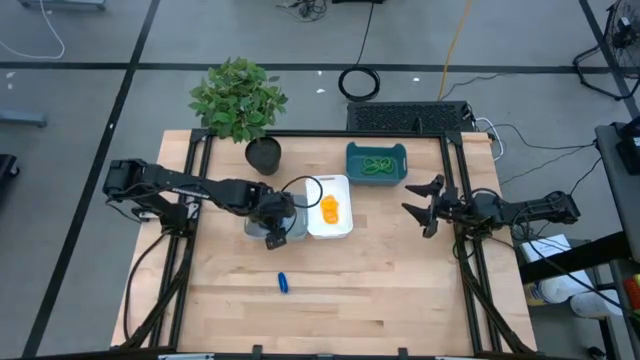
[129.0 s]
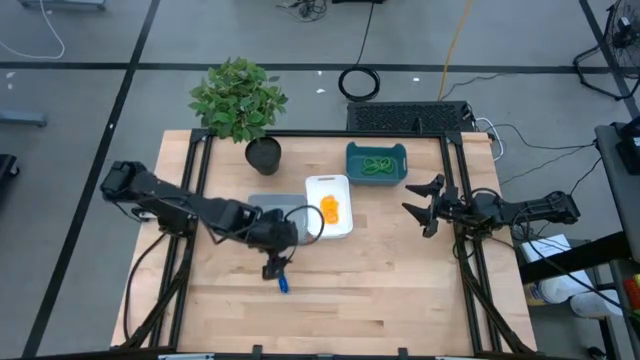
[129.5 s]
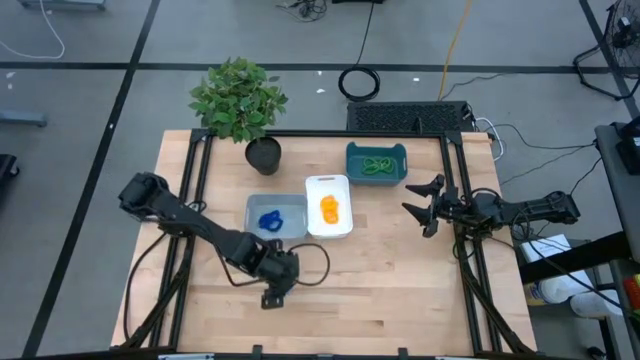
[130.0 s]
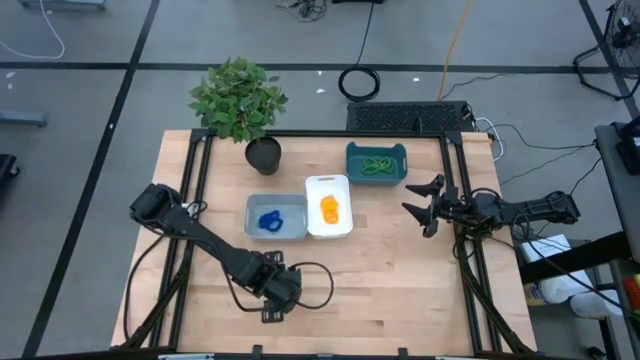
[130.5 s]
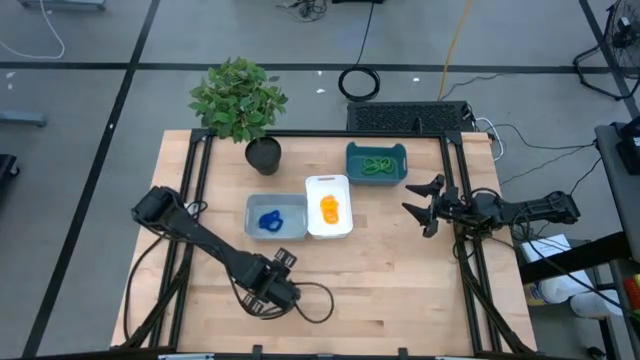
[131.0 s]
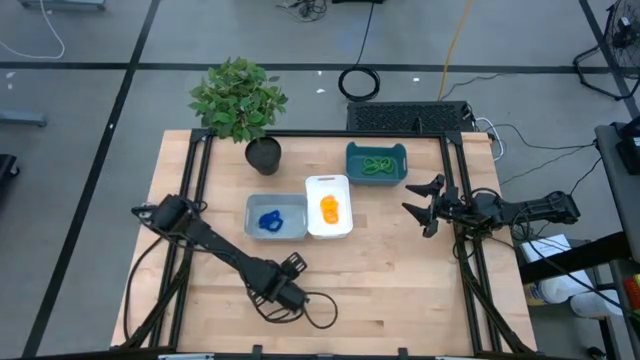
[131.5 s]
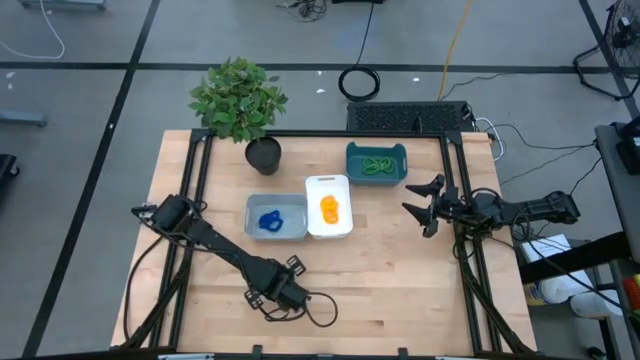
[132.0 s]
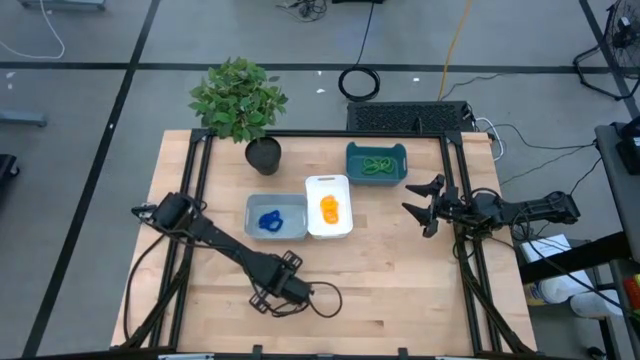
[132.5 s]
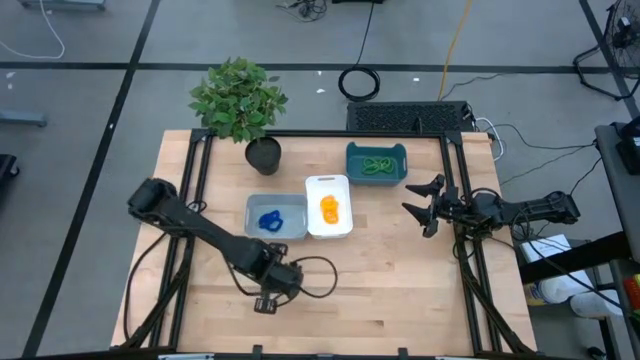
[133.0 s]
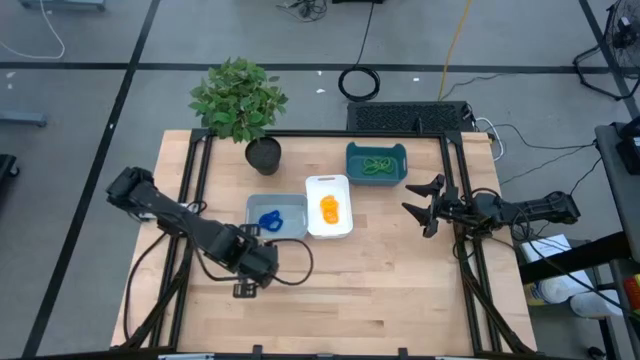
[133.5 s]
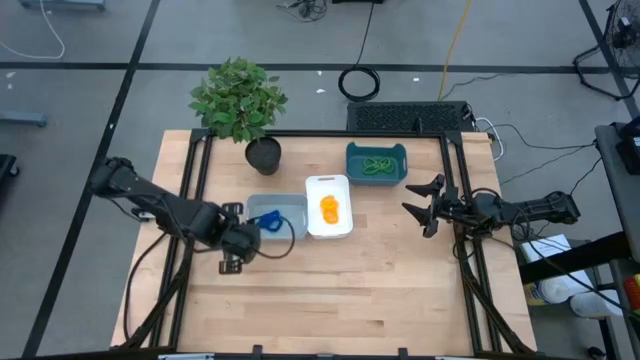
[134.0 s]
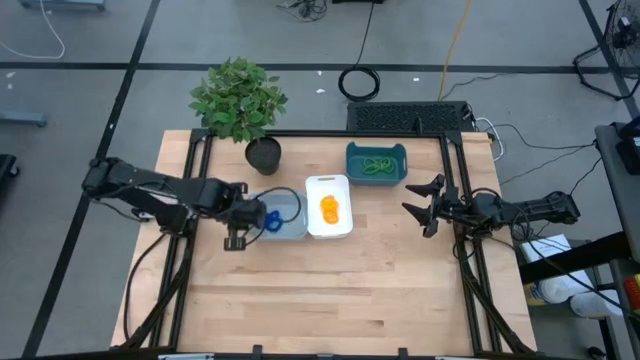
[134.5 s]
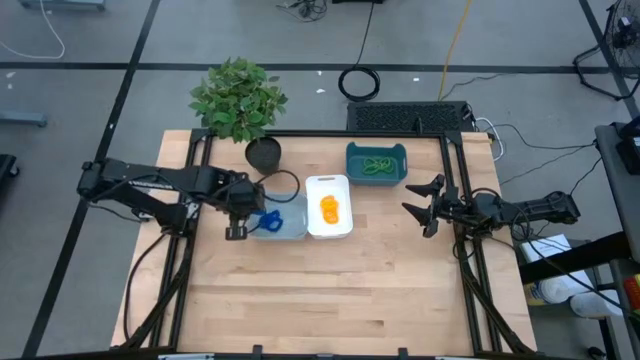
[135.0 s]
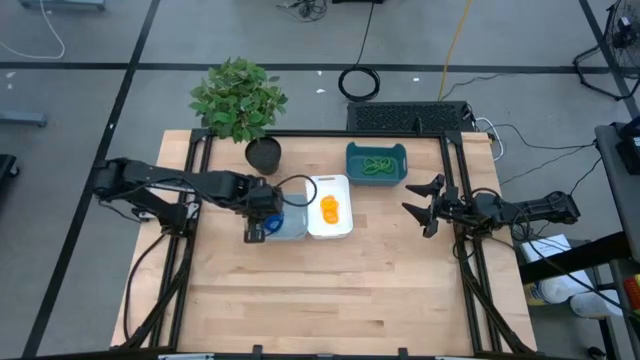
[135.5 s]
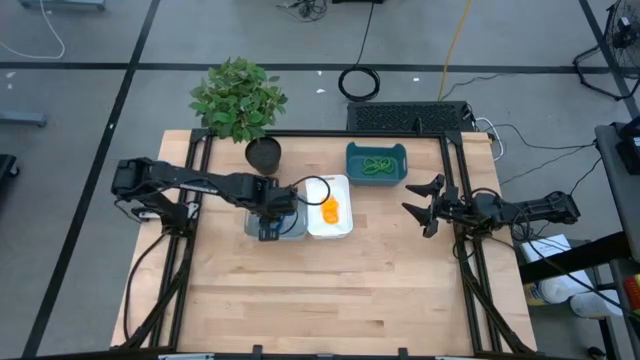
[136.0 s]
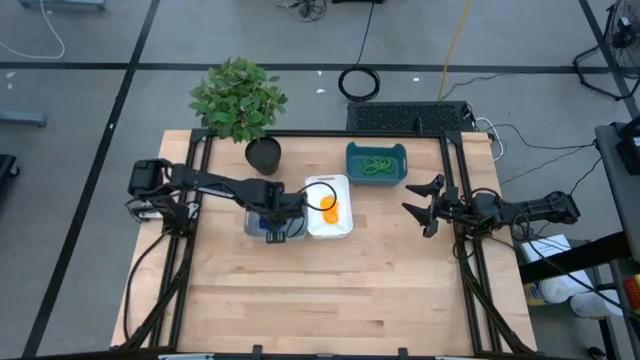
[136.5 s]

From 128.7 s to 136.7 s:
Task: Sort spring keychains
Put the blue spring keychain into the gray bin

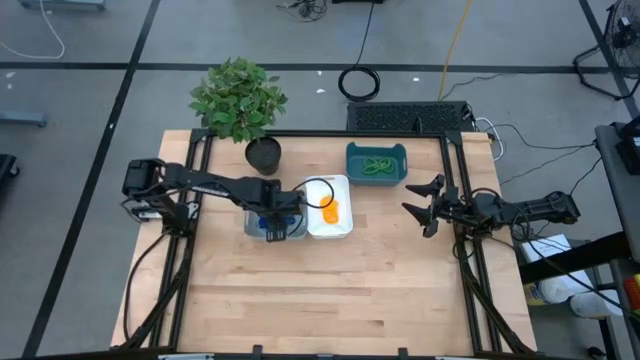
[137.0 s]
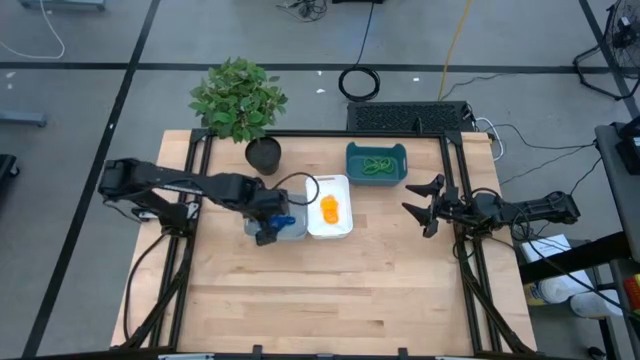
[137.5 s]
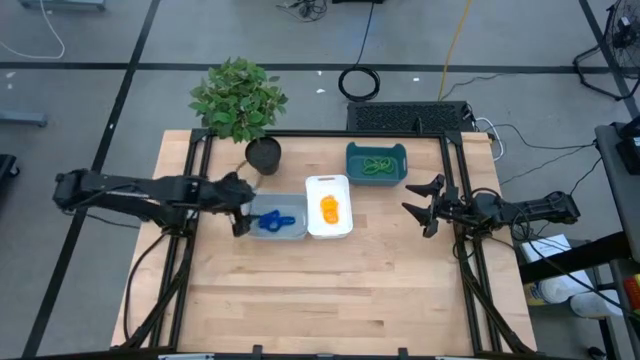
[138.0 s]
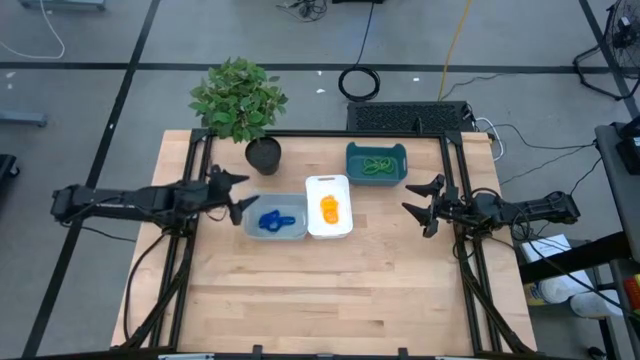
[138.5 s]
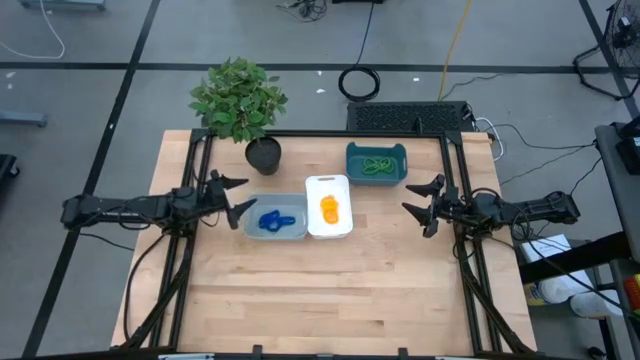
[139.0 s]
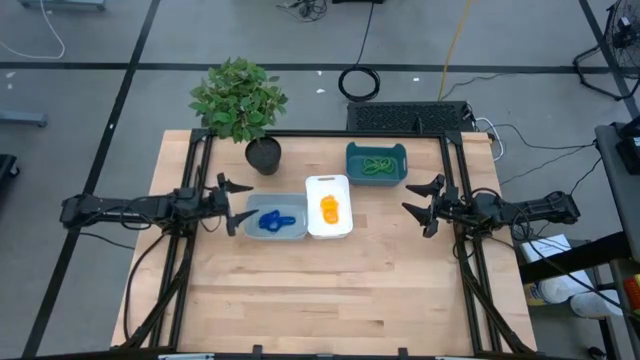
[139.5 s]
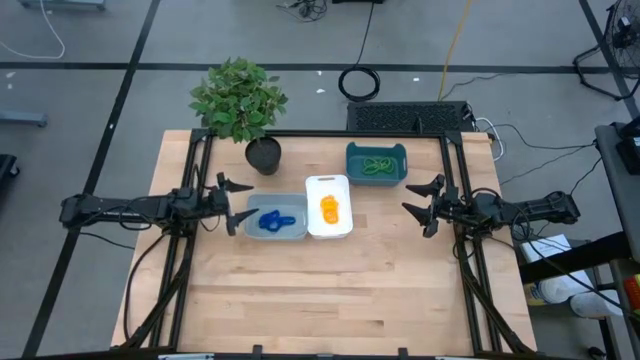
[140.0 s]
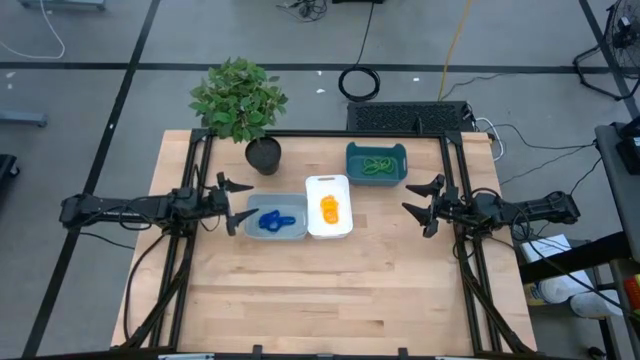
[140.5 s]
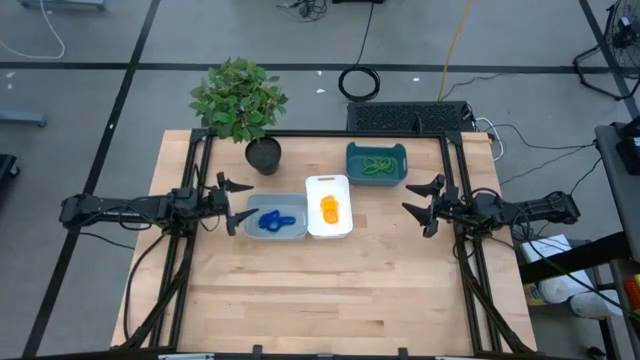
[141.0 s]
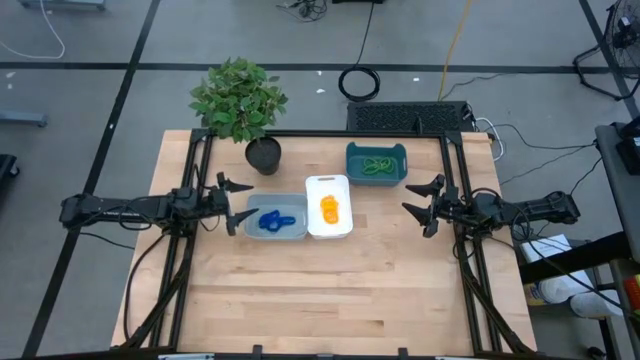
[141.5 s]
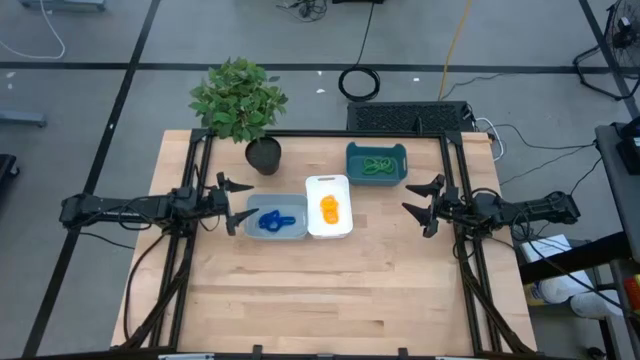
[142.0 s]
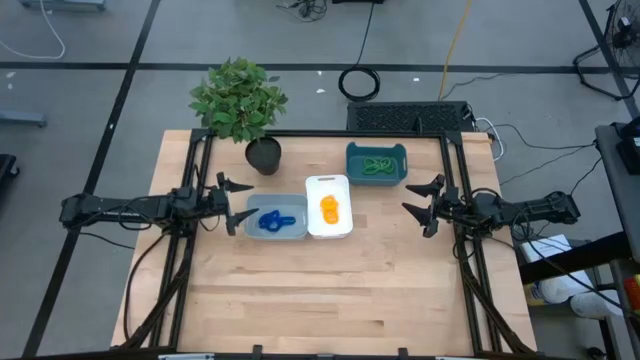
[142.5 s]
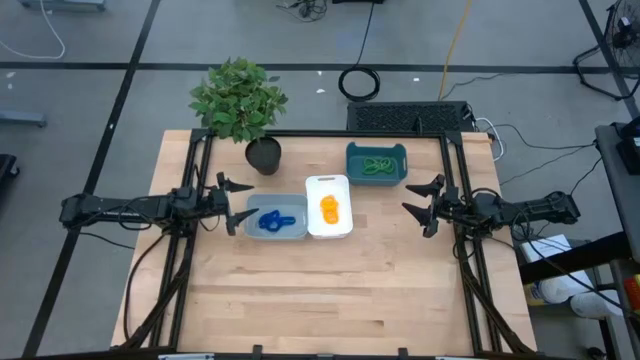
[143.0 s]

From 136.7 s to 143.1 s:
Return to Home Position

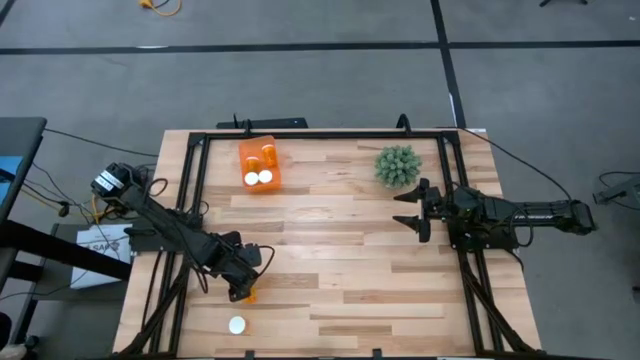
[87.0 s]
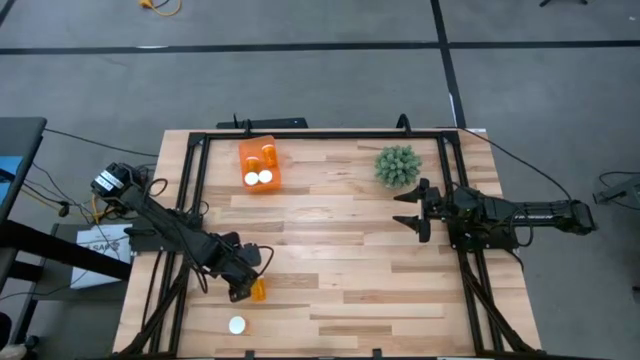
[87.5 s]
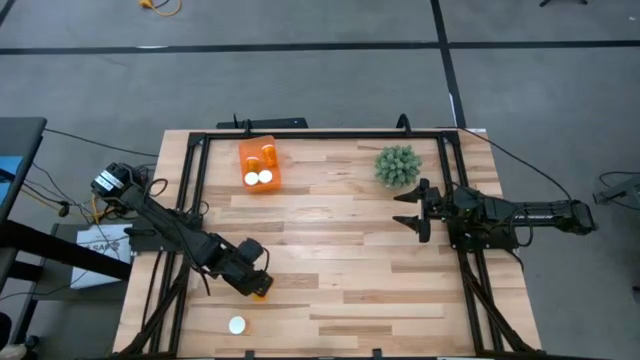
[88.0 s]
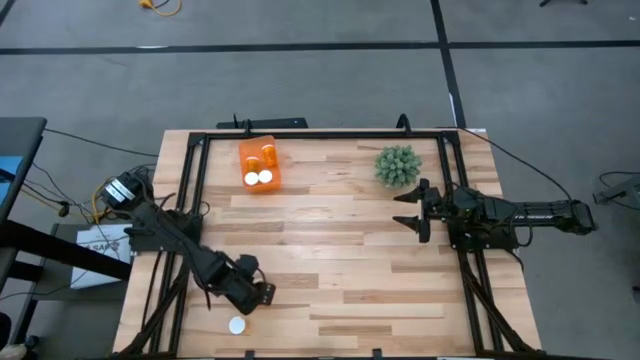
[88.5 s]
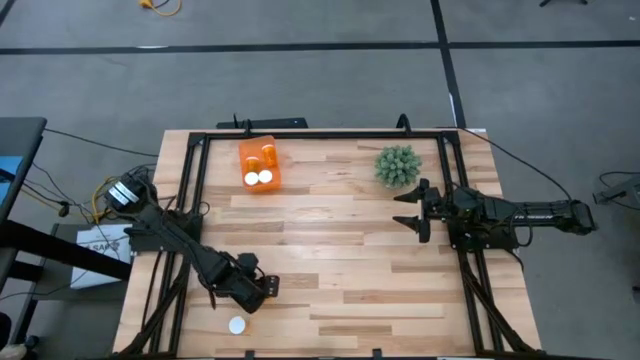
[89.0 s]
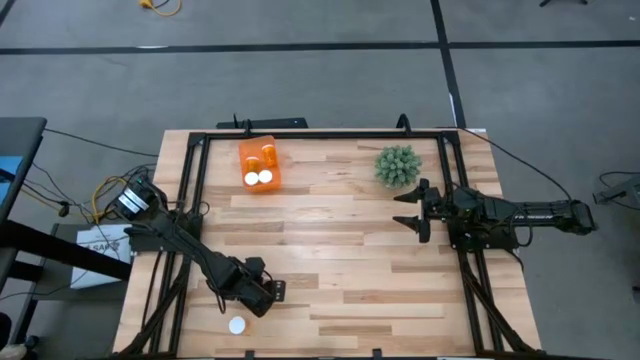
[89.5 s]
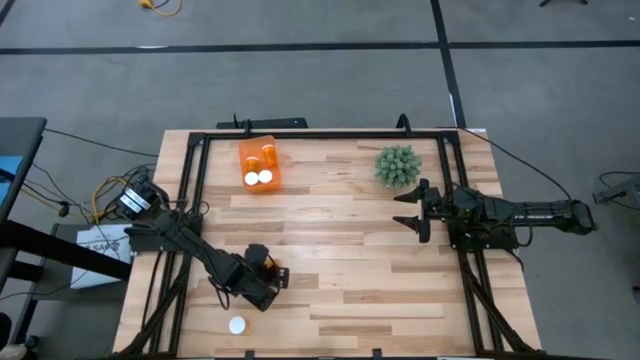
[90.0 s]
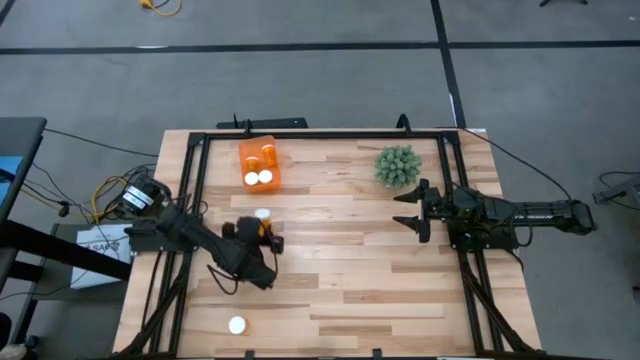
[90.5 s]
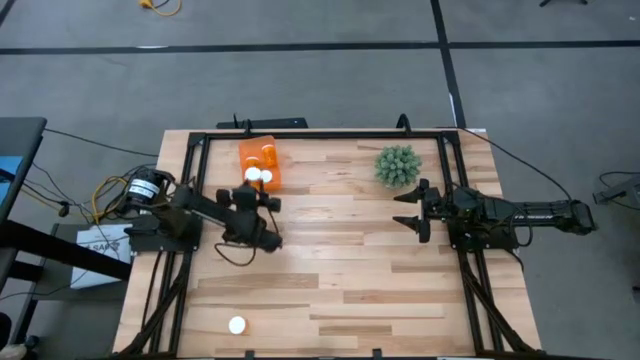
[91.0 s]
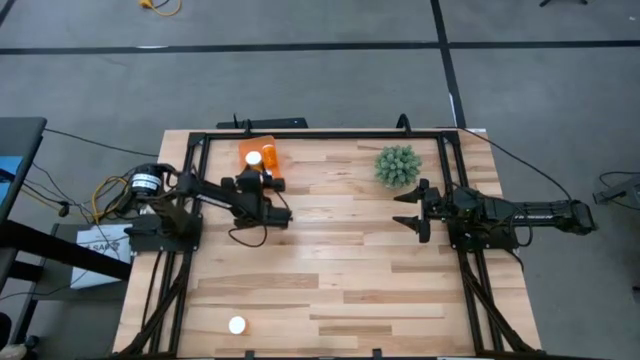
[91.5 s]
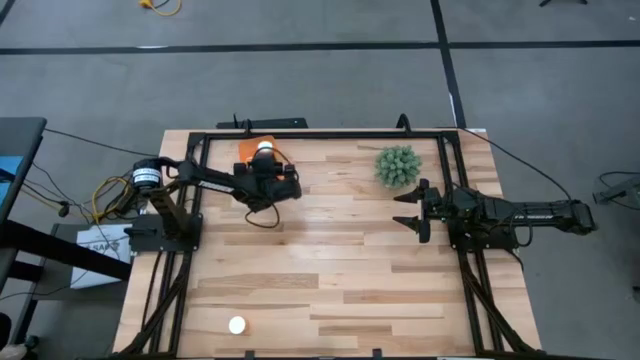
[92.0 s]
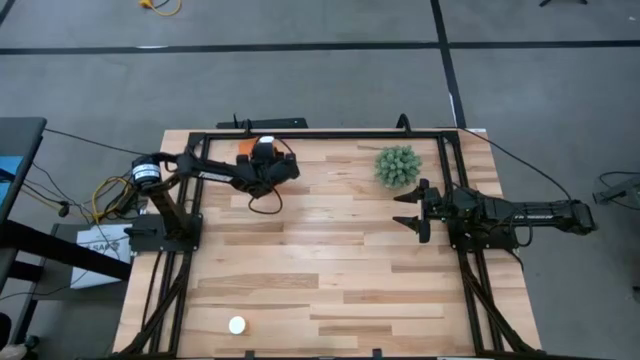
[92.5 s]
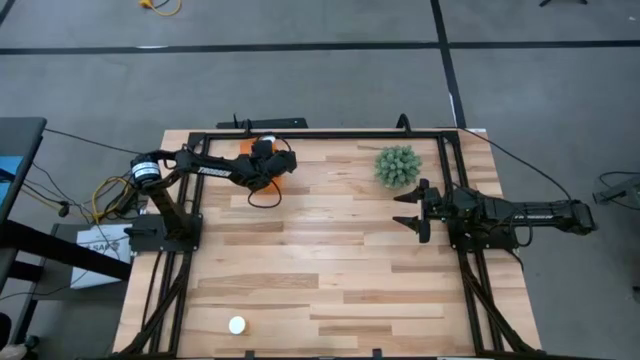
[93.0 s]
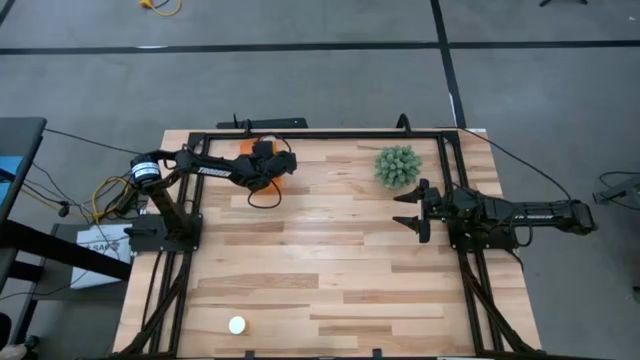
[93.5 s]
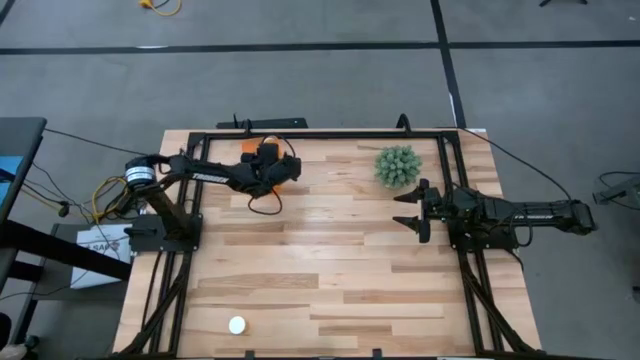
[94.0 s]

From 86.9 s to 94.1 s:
Task: Pick and place pill bottles into a basket
Put the orange pill bottle into the orange container
